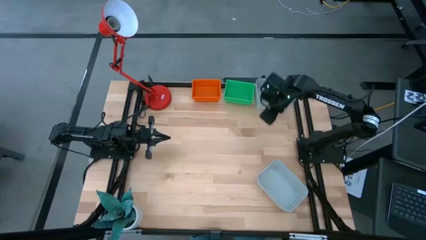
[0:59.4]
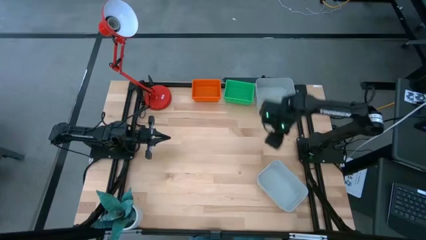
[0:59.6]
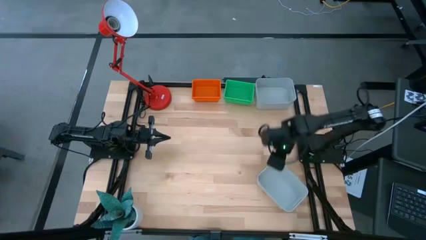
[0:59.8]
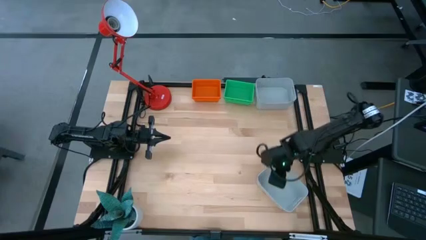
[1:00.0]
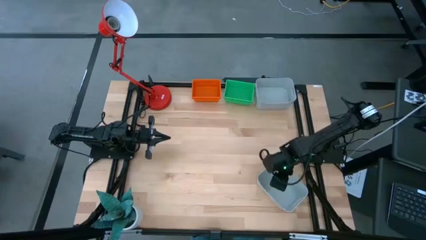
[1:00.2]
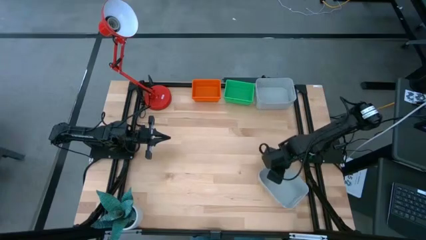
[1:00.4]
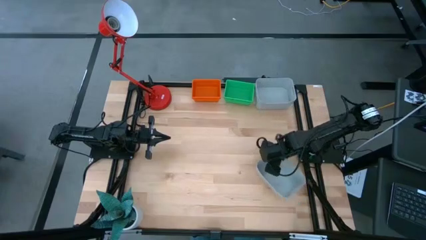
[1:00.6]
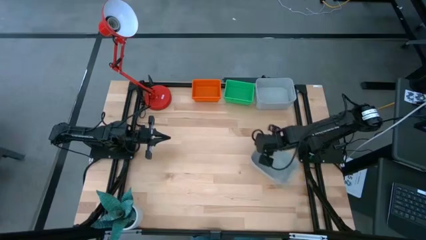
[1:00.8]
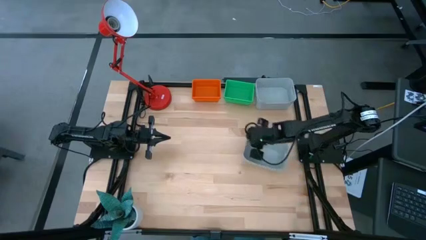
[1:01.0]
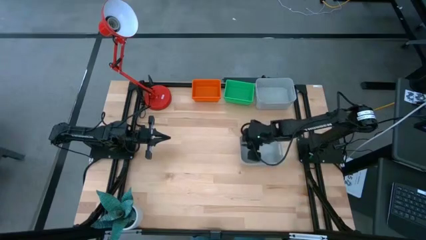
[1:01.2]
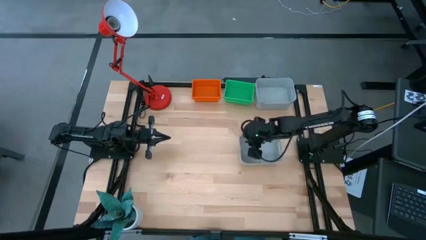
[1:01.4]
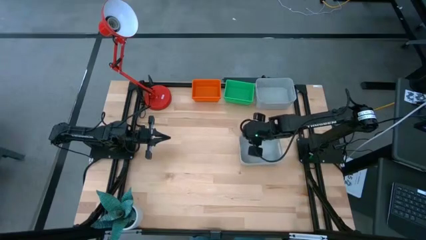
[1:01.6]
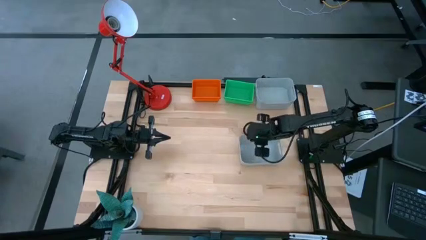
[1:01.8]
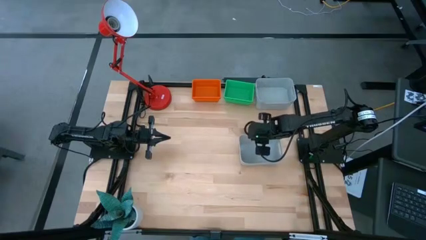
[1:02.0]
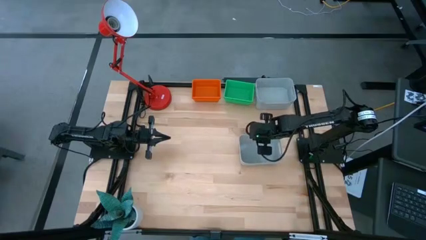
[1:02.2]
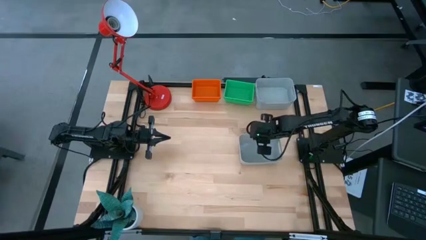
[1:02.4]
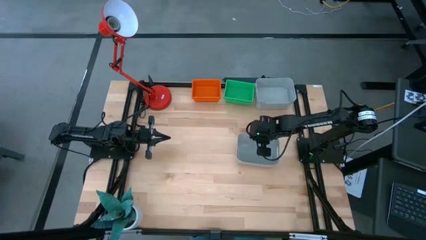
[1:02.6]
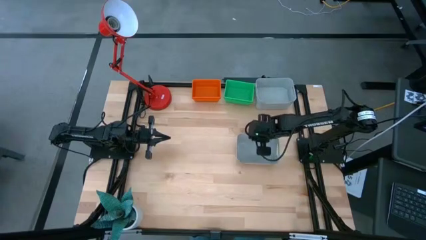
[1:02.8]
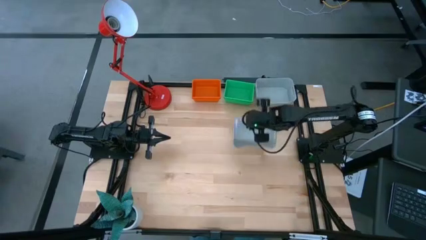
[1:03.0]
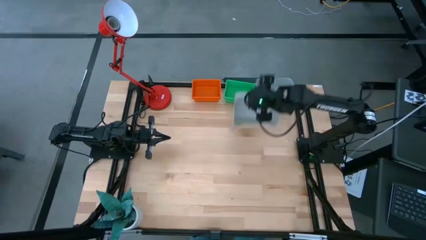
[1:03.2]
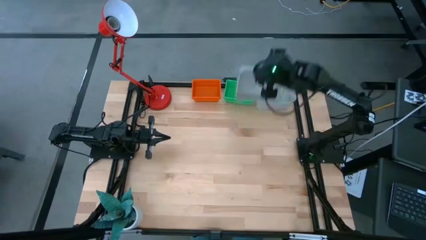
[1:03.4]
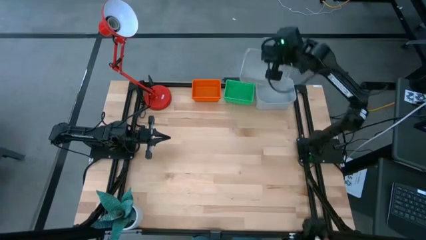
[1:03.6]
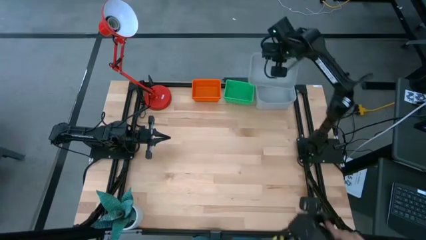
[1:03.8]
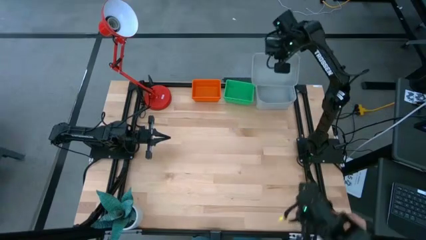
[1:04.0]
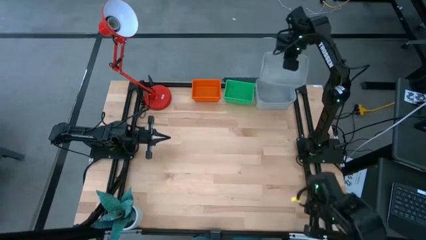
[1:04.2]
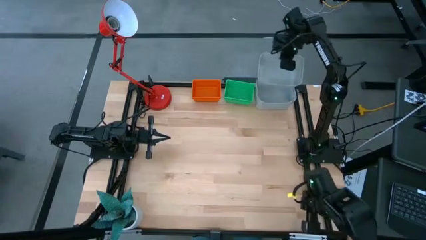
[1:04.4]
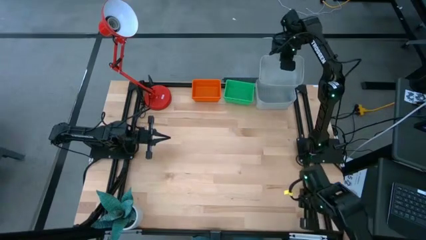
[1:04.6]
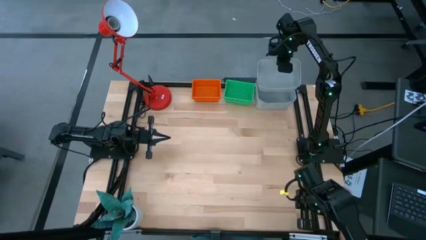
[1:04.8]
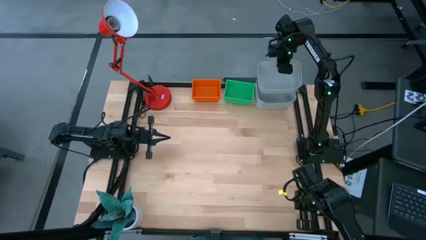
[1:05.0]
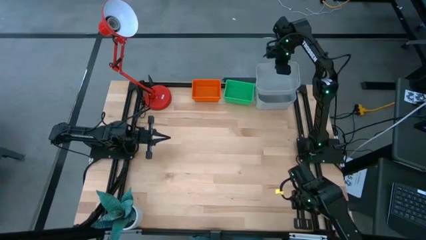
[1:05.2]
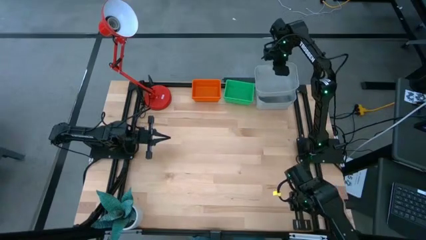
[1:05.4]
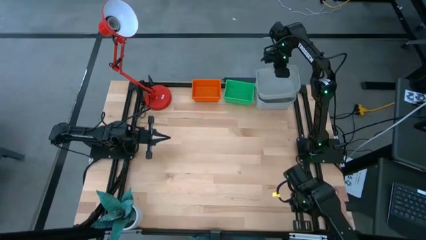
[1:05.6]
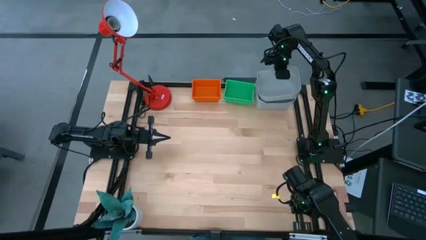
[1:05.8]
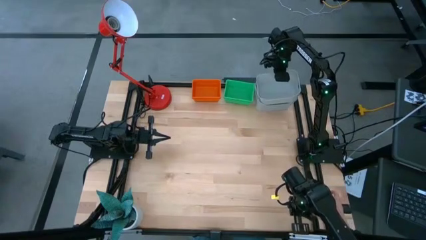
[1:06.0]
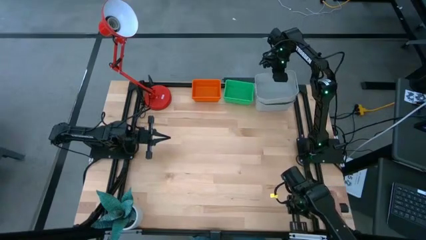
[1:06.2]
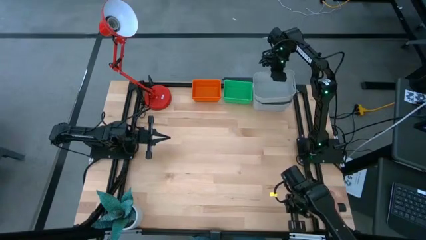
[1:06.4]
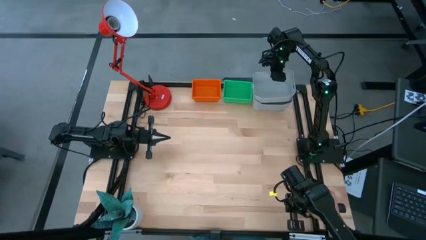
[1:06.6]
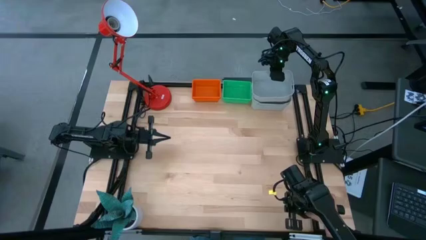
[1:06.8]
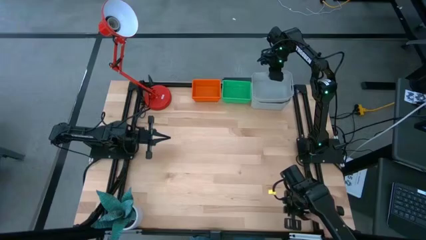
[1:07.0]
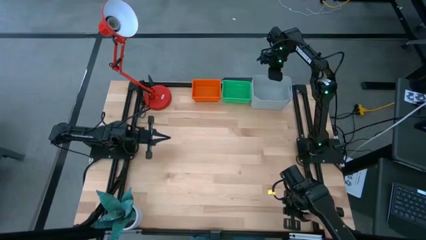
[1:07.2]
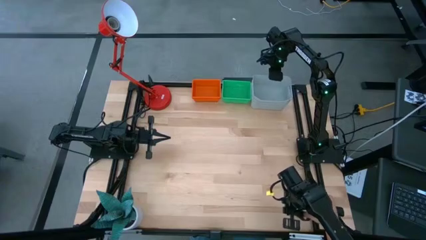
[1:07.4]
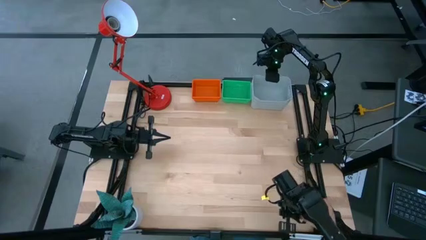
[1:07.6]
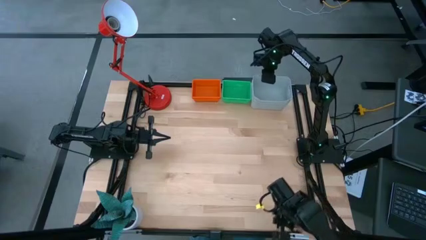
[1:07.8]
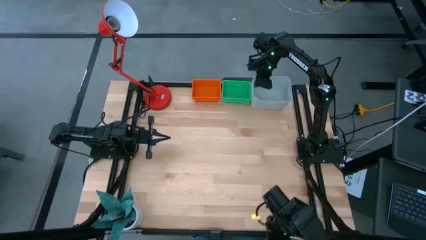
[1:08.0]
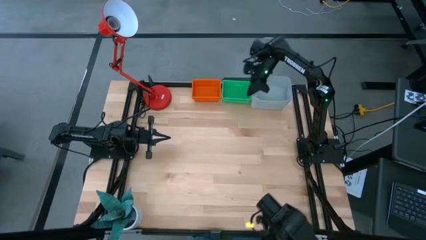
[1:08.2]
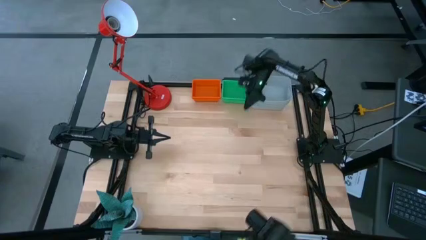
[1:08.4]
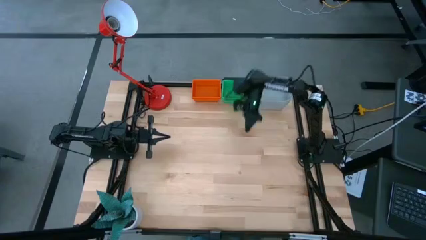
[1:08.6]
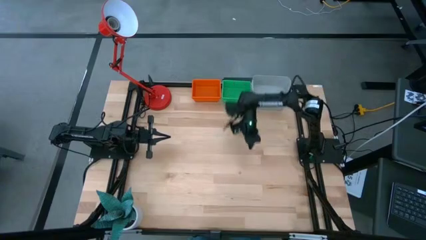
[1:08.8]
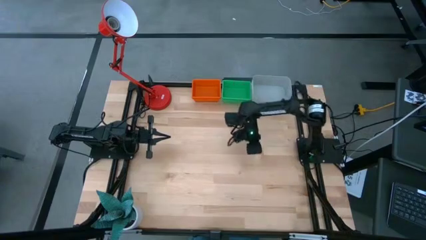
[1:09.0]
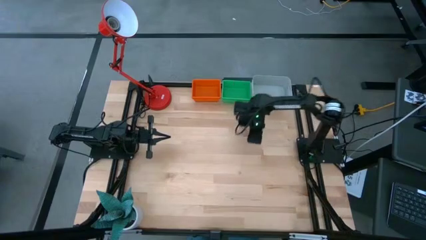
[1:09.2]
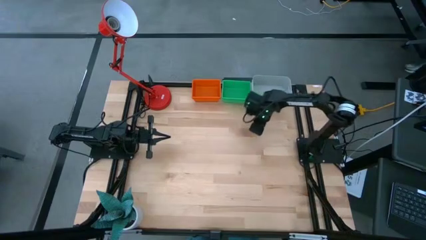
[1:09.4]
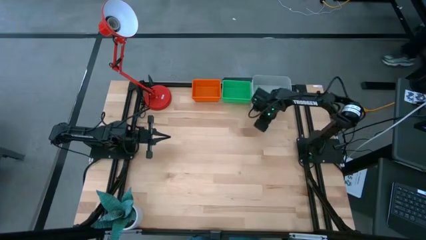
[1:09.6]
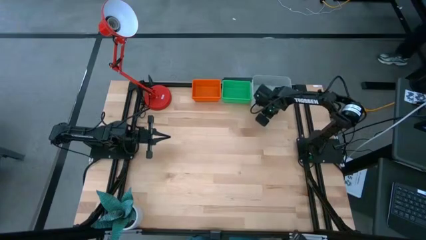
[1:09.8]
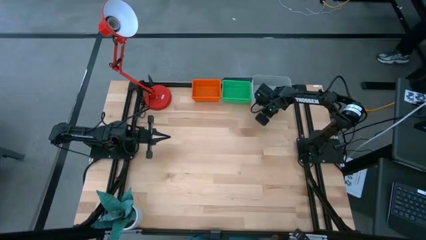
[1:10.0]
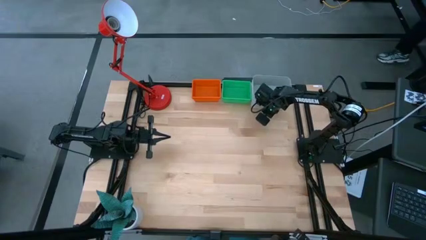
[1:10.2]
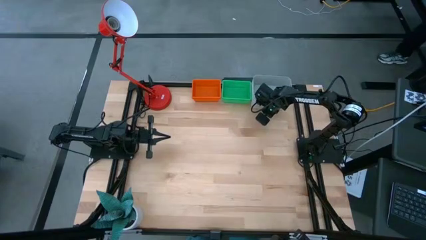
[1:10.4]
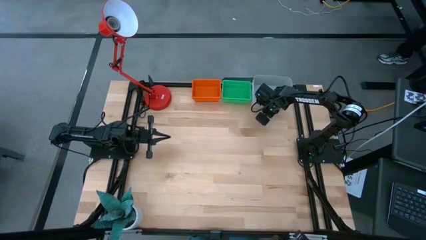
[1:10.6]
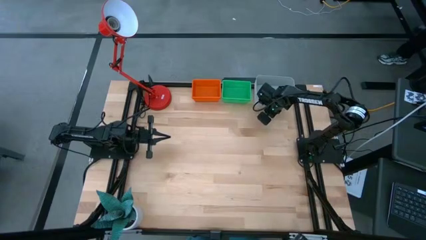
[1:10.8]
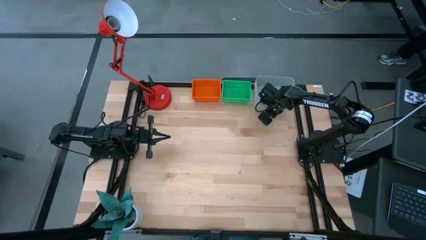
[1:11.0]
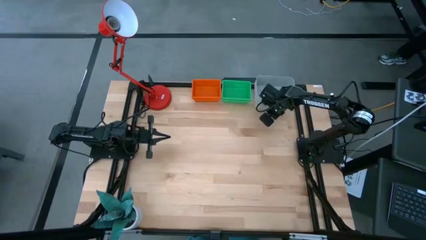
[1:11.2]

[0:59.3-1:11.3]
Stack the gray bin on the top gray bin

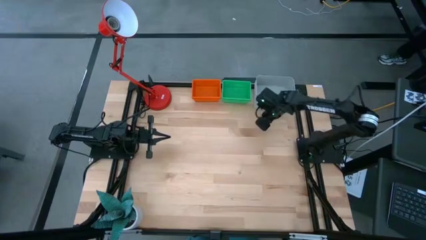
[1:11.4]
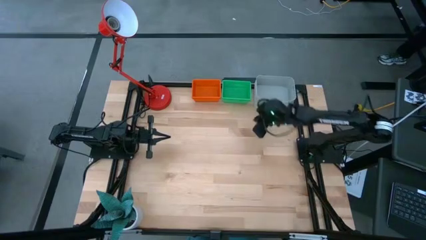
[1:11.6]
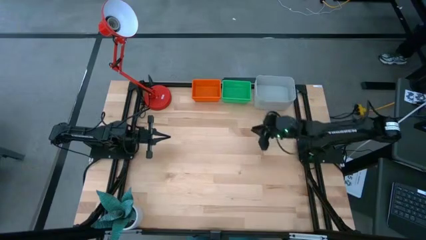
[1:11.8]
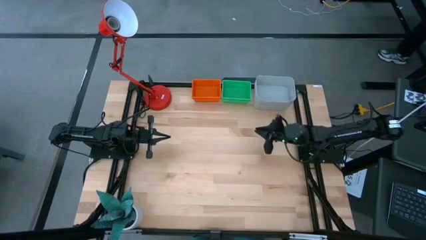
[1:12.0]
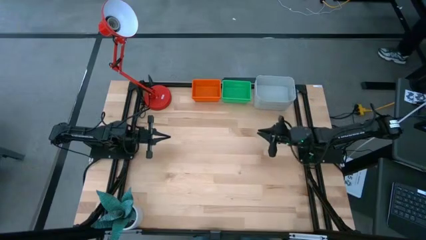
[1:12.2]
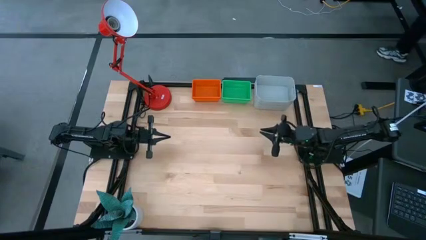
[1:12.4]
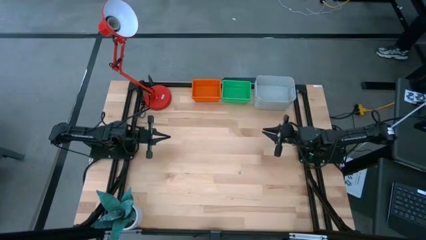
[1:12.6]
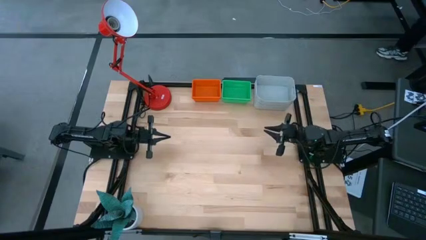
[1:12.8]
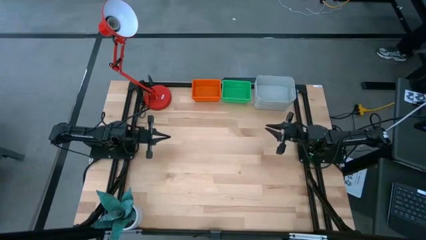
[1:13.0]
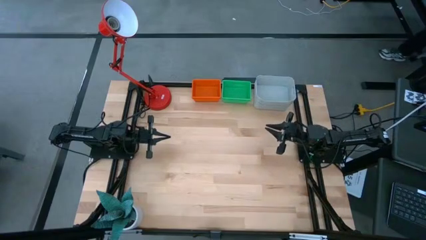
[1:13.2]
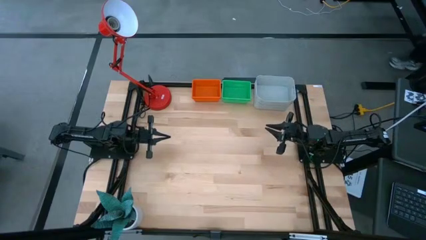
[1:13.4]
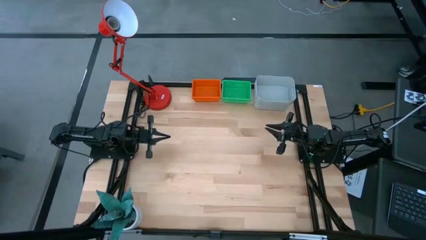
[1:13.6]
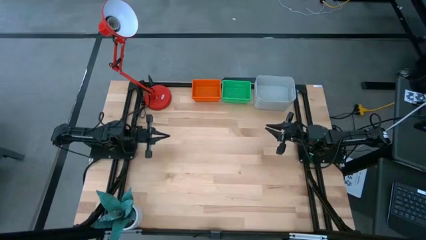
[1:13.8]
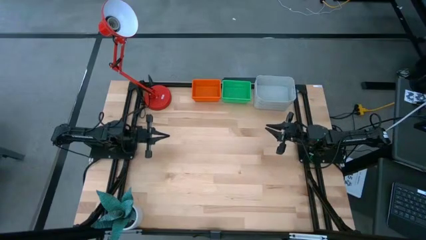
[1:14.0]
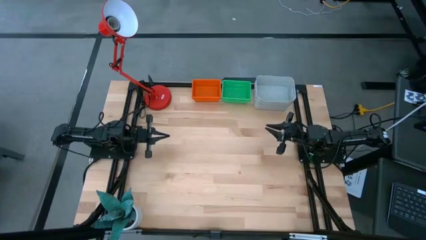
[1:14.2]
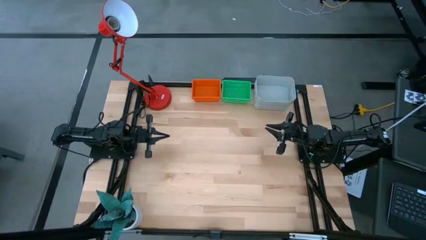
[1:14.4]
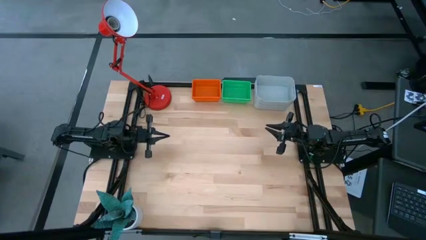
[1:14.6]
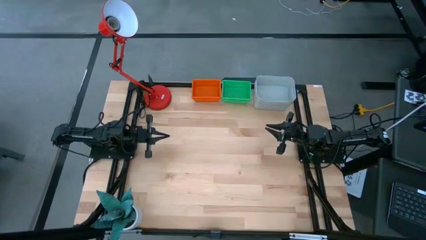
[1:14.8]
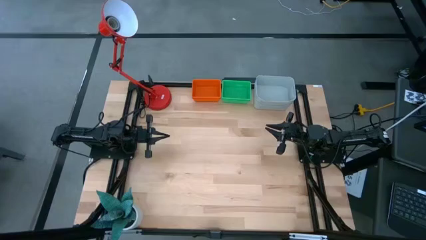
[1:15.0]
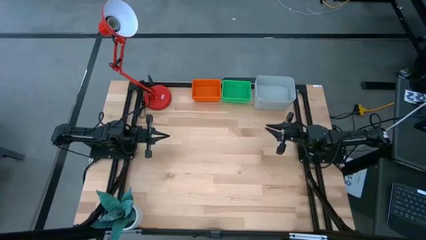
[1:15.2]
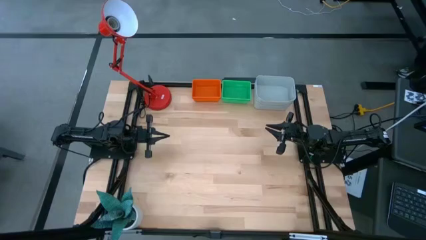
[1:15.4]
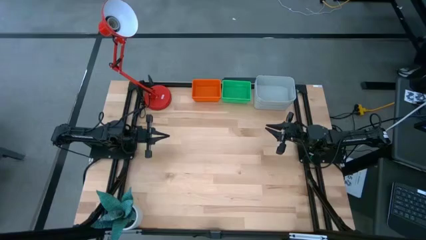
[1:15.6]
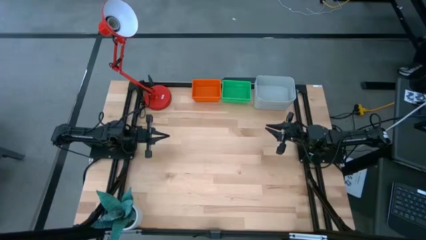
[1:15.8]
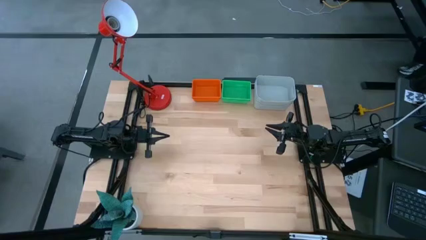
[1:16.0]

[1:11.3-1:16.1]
Return to Home Position
